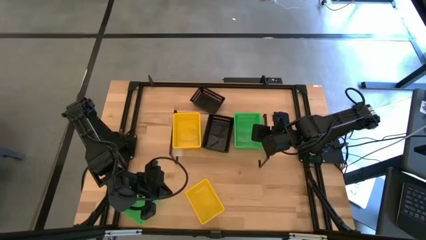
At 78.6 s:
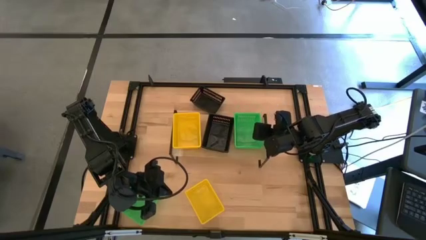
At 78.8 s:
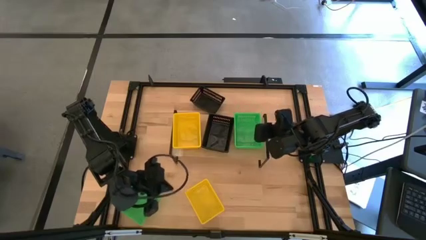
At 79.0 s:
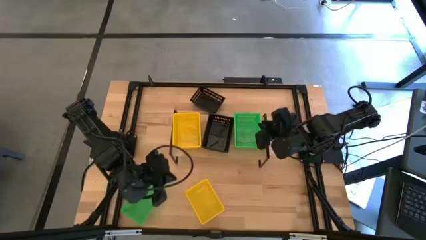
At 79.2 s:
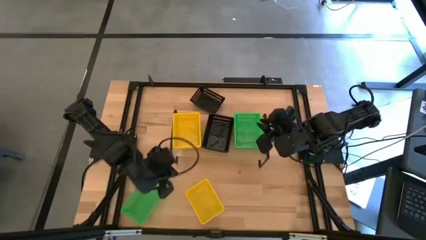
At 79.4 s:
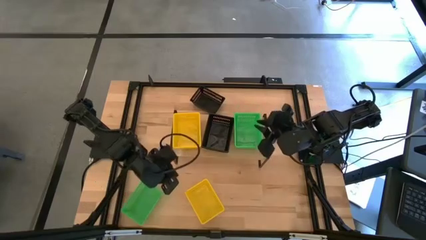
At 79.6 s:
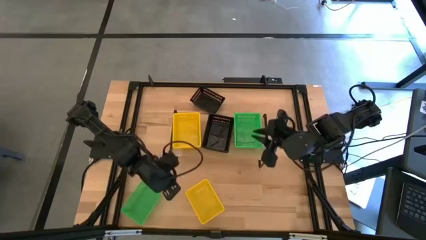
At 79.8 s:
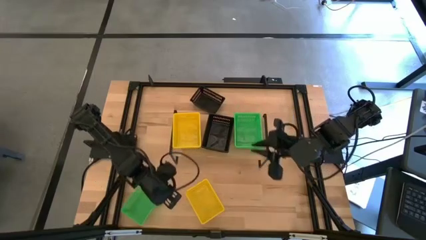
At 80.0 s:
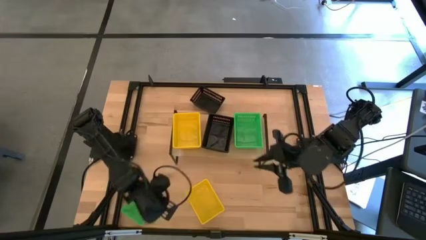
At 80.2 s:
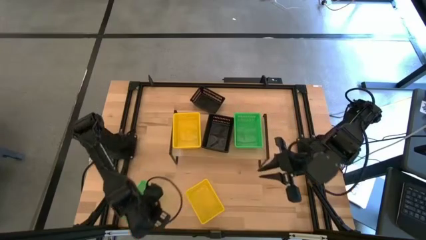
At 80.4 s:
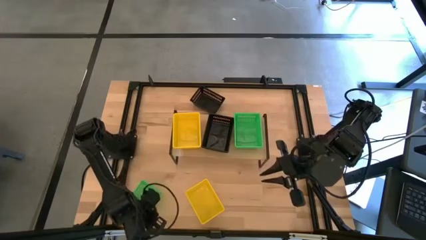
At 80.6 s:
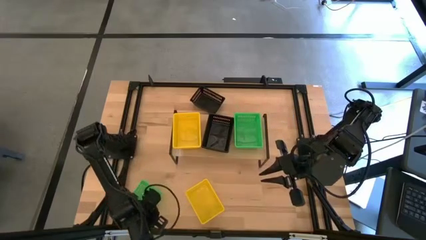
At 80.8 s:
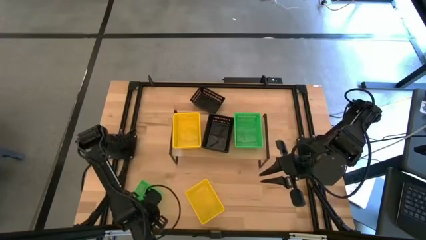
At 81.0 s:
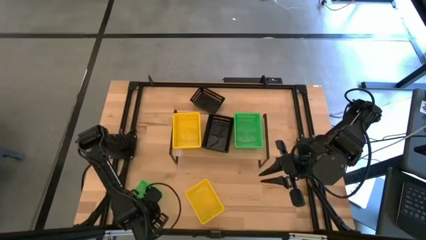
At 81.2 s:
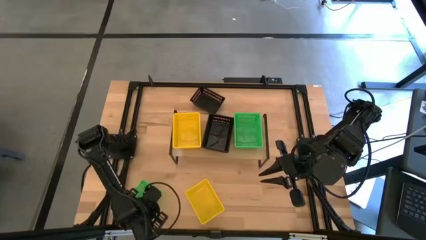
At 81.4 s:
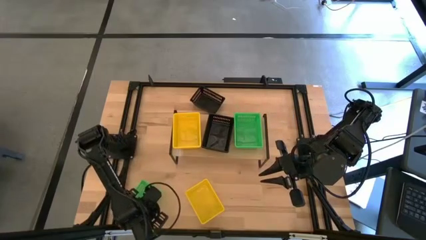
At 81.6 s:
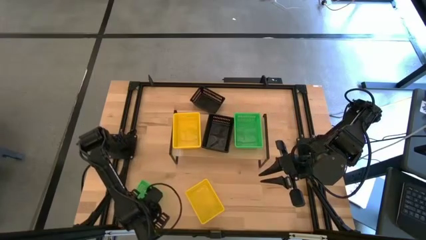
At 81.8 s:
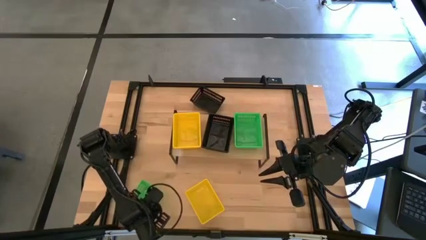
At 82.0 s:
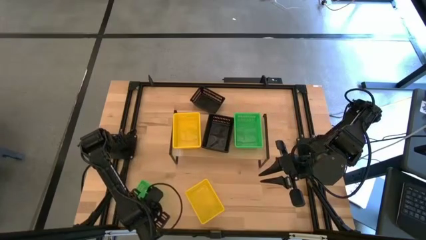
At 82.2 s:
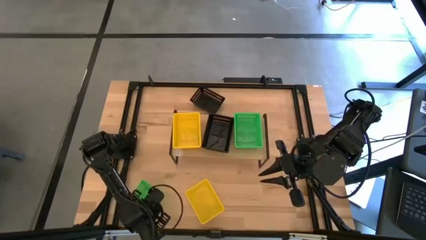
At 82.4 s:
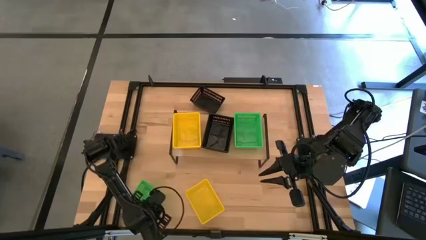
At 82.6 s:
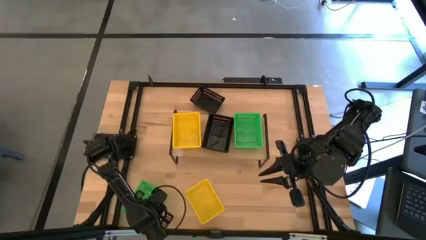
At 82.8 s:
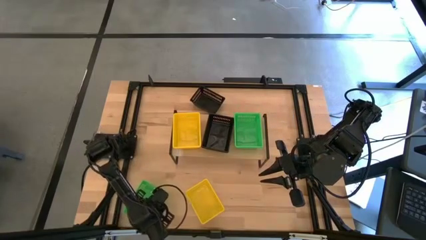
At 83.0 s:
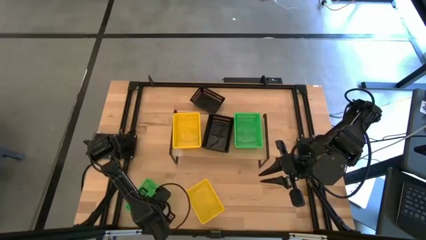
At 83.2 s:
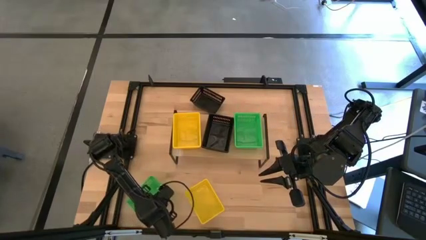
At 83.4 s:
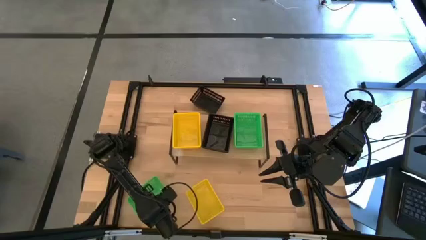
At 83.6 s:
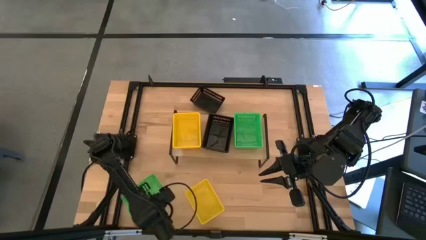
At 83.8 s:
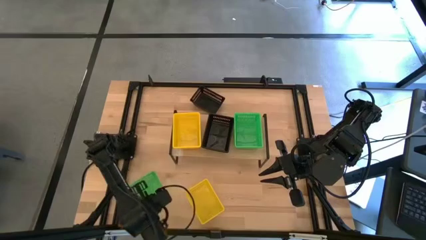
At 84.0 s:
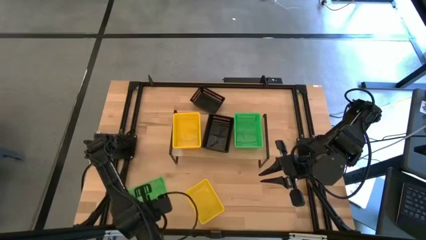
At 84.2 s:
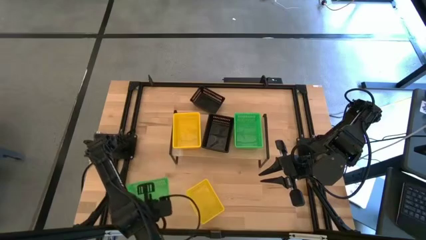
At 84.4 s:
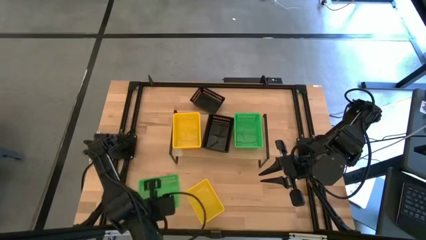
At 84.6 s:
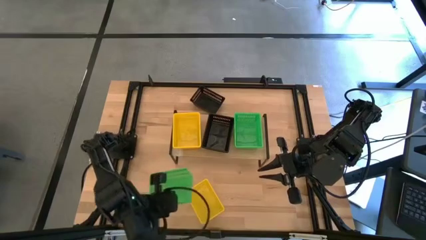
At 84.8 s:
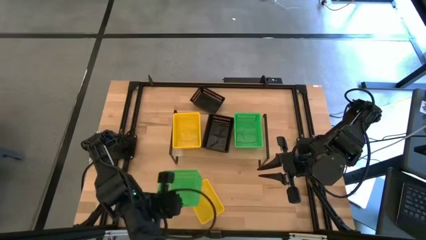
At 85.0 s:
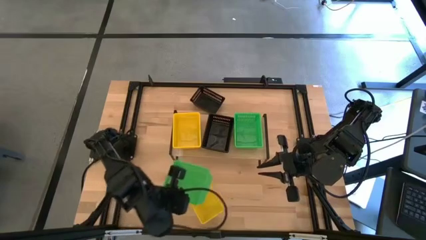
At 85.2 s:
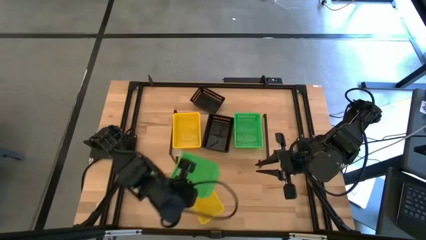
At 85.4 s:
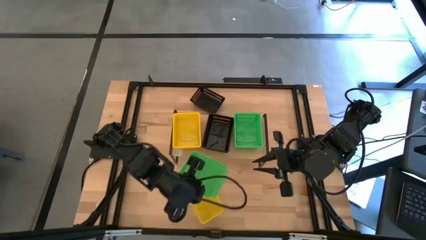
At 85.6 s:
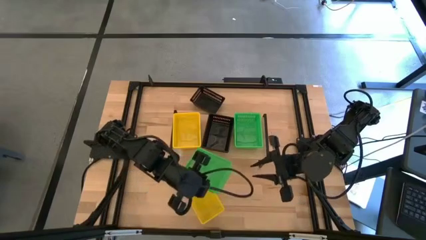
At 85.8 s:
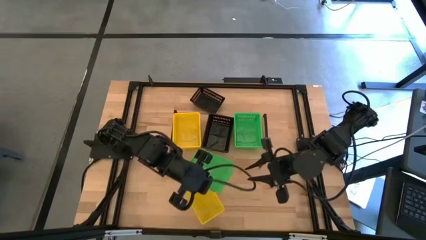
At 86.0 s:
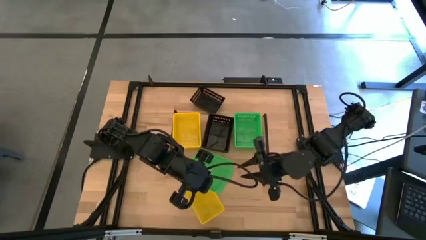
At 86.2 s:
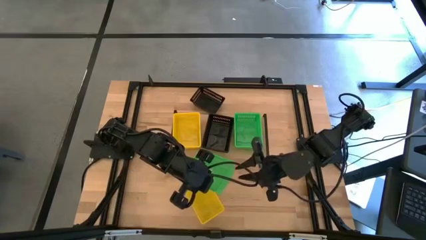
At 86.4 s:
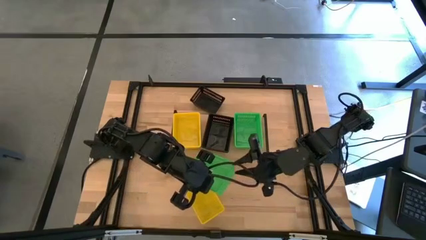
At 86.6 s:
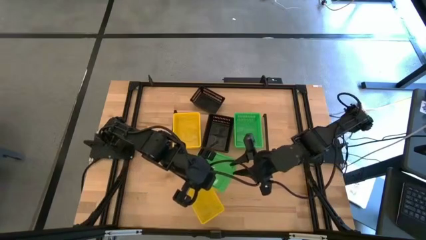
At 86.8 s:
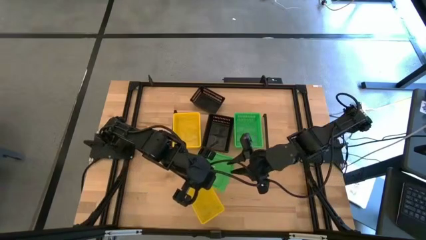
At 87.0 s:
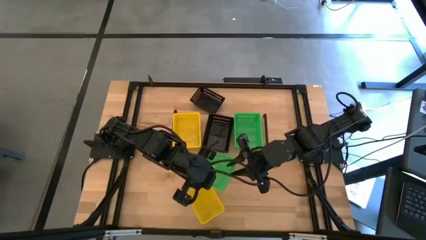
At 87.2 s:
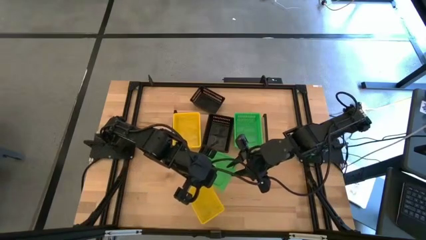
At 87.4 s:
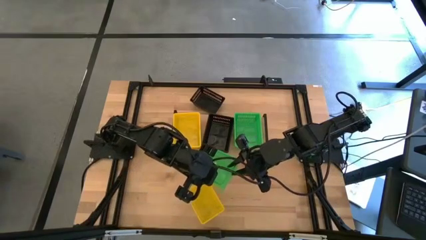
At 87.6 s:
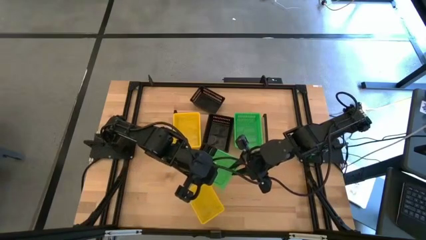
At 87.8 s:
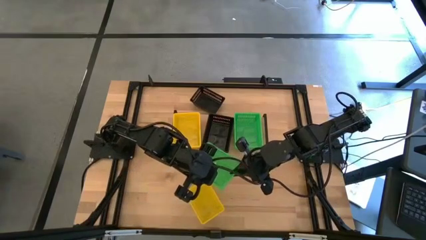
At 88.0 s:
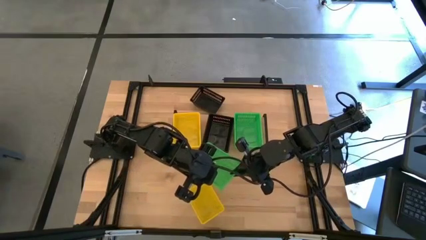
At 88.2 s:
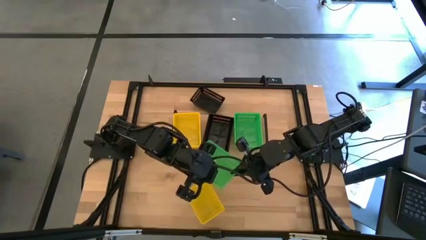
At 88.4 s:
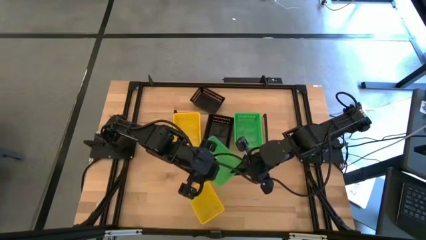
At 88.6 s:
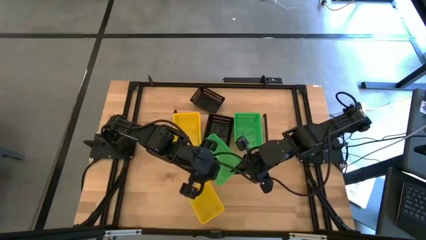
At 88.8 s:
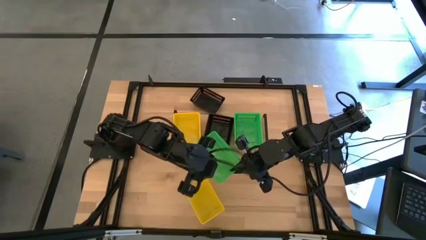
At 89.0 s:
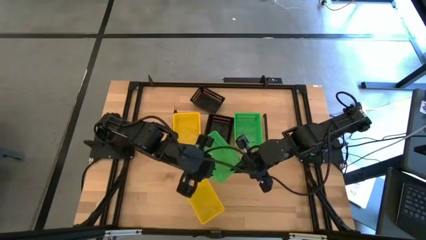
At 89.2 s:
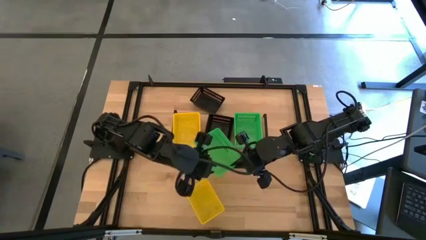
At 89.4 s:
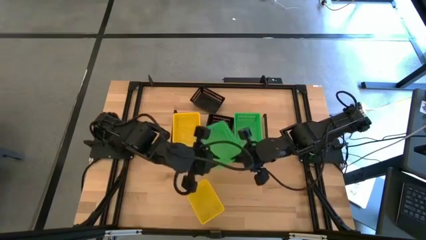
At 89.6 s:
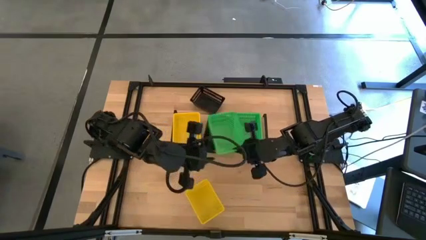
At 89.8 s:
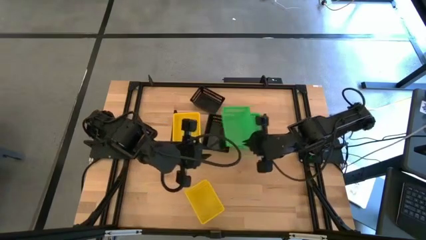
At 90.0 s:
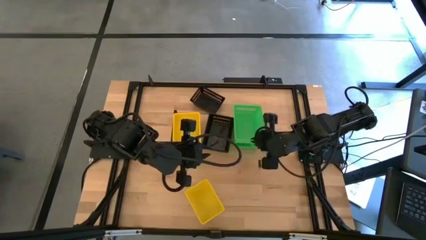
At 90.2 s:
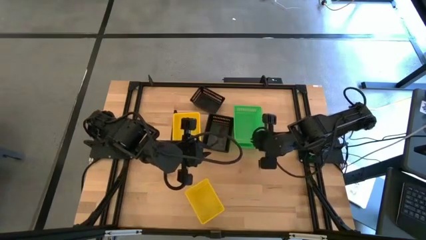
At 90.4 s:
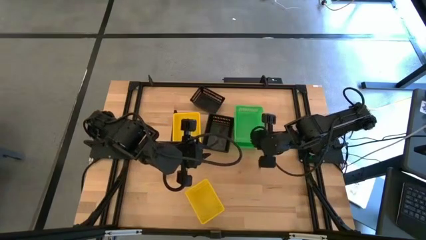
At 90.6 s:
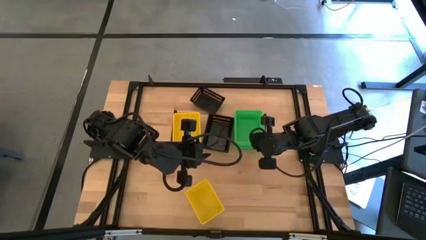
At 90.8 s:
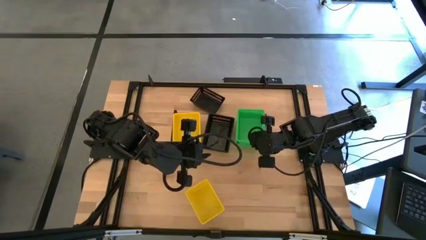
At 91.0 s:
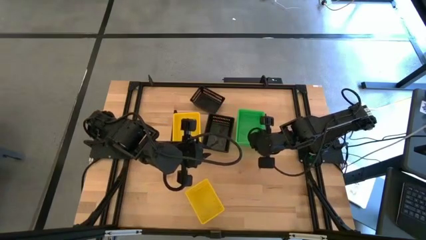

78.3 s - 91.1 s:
Task: Stack baskets on shelf by color
Stack the green bin on the stacked green bins on the shelf

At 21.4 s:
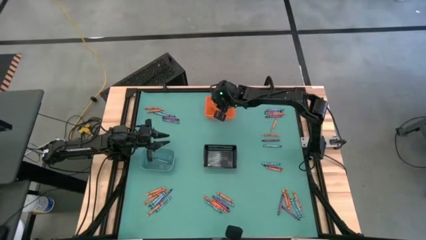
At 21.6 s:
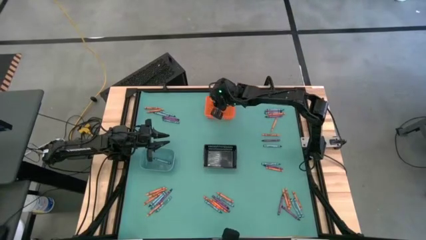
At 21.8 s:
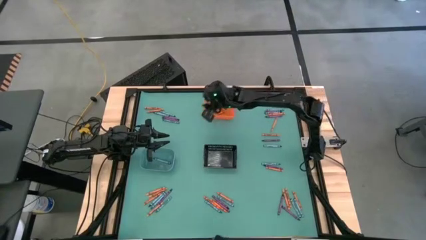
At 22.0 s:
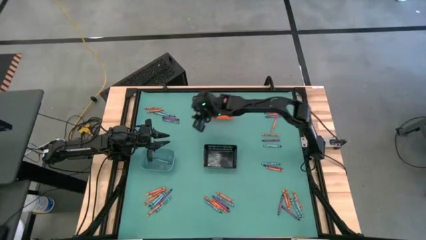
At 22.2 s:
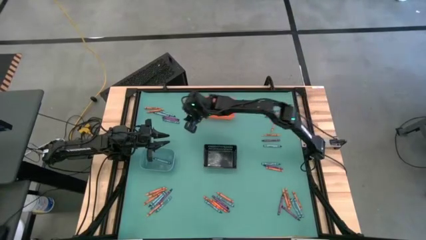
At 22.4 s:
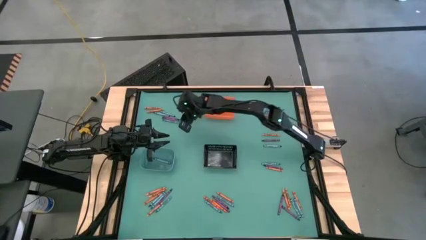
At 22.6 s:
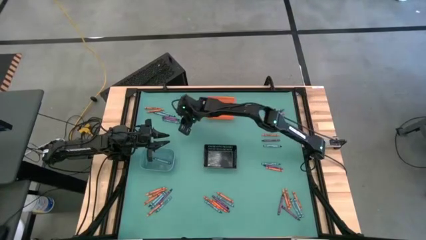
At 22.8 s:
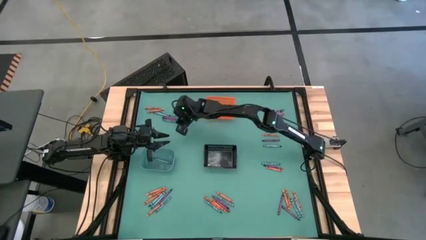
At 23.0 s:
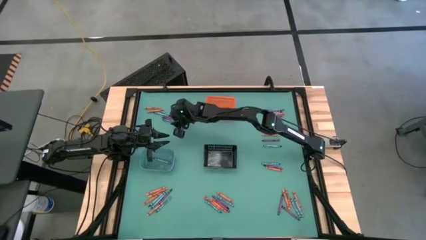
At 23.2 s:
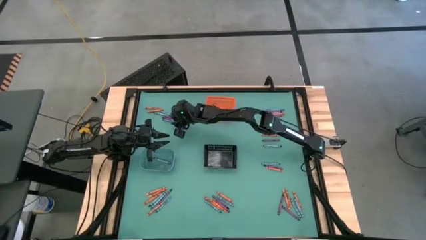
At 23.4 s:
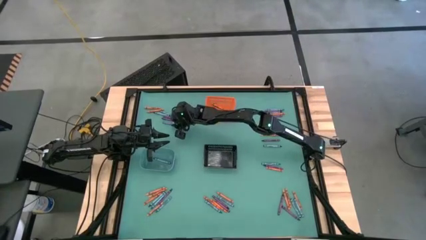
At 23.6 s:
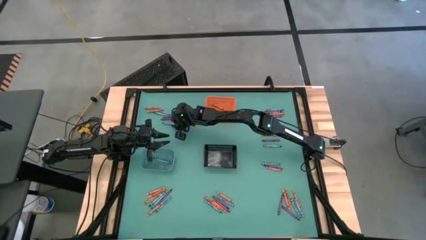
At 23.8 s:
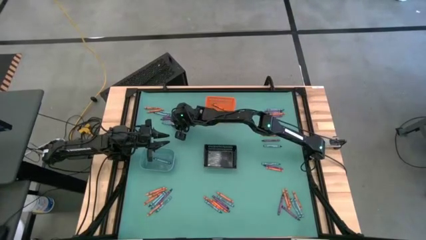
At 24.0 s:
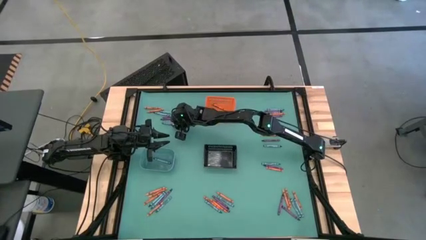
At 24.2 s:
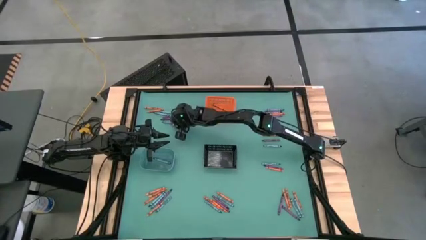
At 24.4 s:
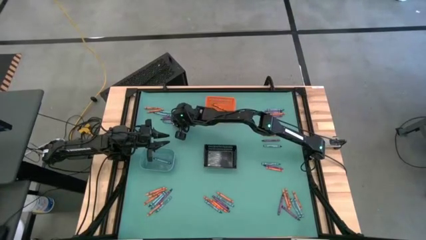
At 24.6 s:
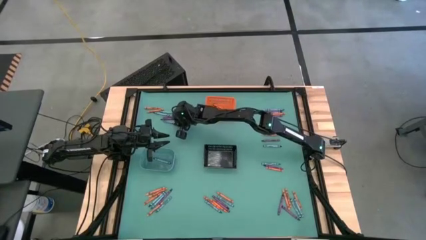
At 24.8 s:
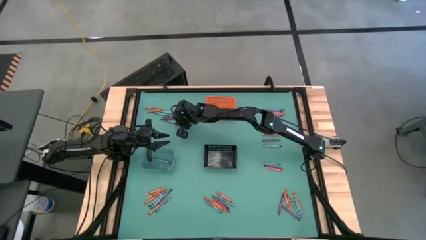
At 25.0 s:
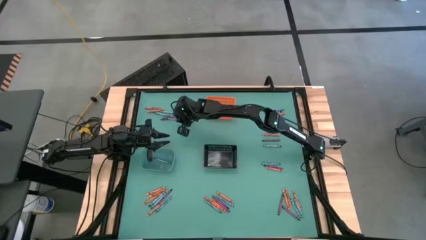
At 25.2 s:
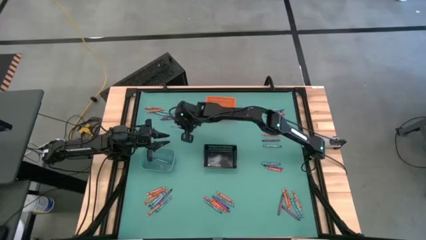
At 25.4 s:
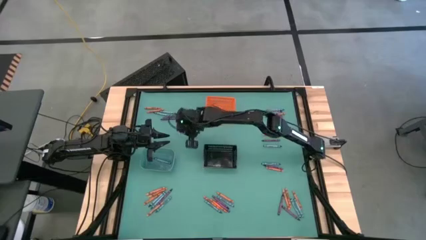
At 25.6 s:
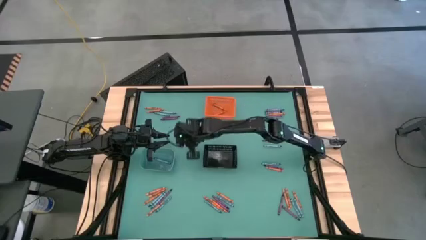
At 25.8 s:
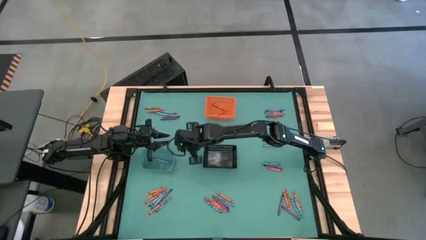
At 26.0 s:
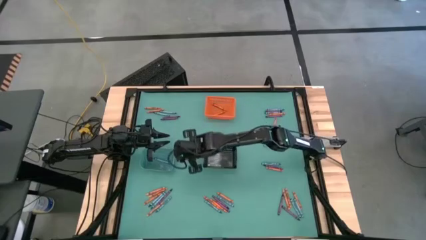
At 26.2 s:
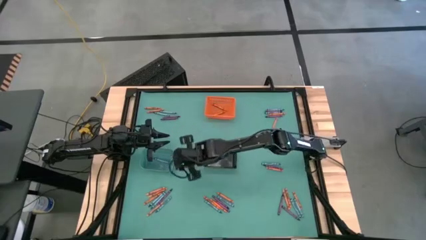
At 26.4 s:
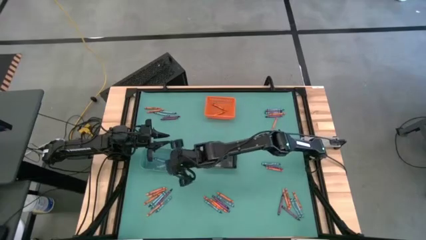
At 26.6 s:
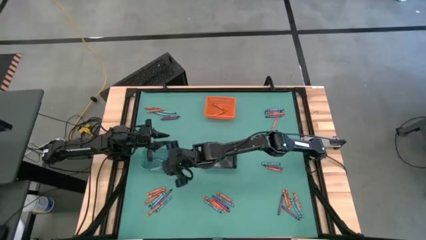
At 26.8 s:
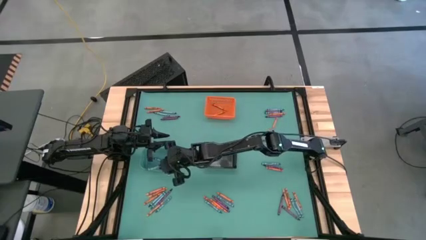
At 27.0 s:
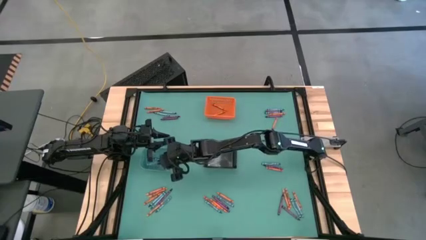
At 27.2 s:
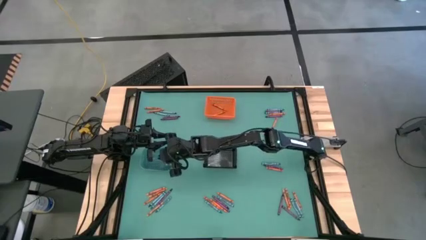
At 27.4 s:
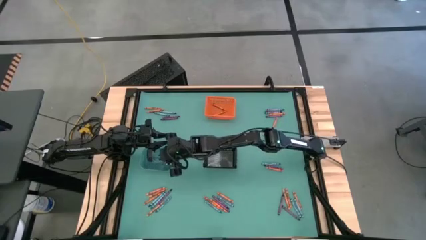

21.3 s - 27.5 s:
Task: Sort crayons
Put the blue crayon into the light blue bin
